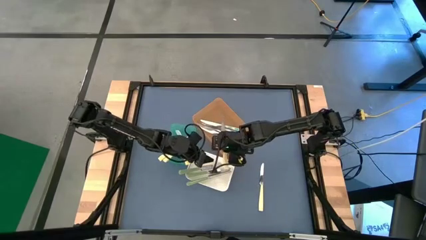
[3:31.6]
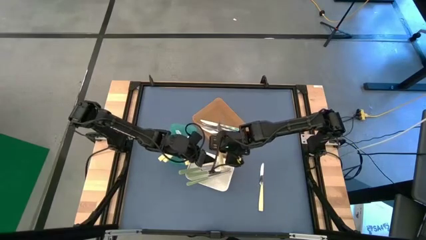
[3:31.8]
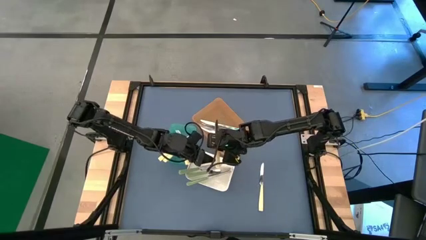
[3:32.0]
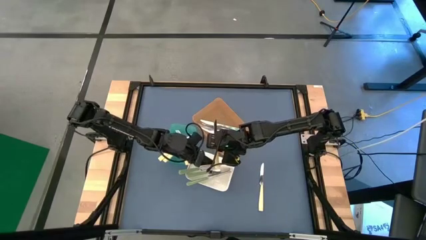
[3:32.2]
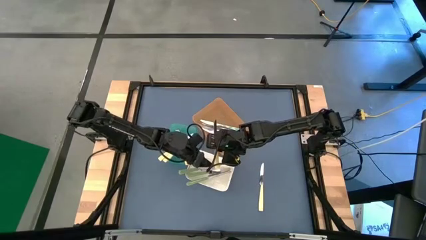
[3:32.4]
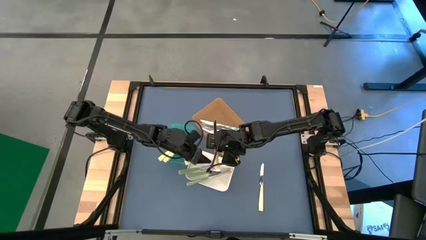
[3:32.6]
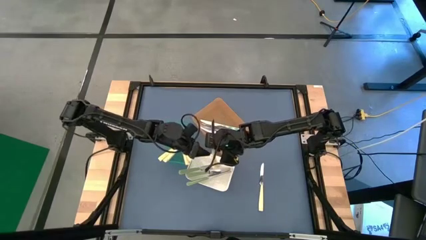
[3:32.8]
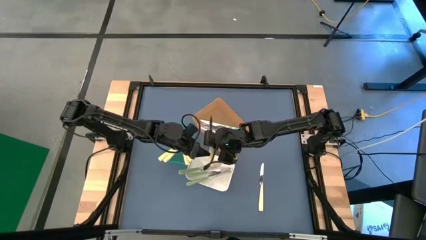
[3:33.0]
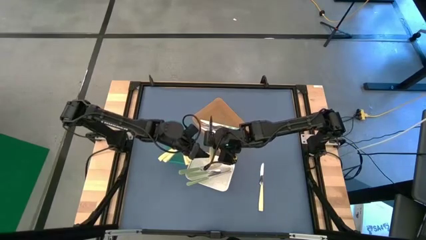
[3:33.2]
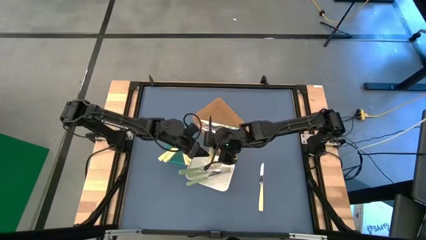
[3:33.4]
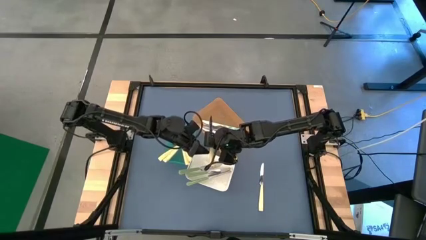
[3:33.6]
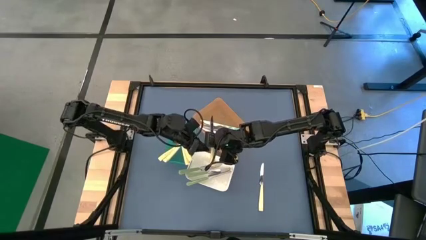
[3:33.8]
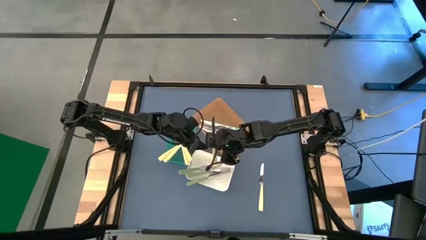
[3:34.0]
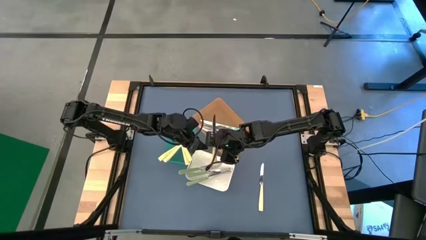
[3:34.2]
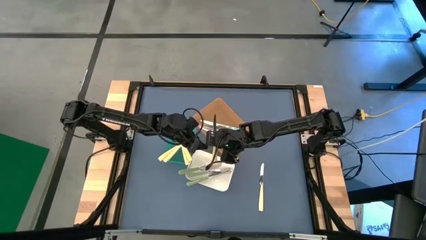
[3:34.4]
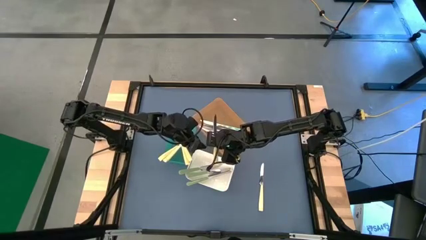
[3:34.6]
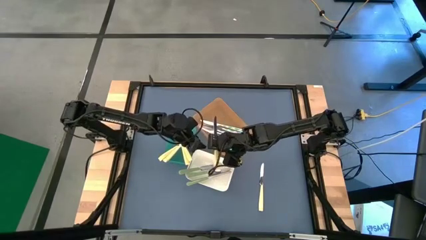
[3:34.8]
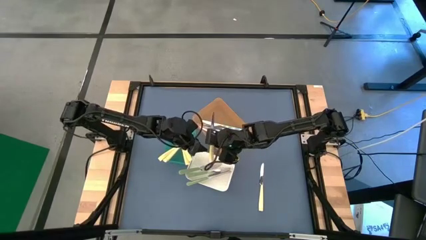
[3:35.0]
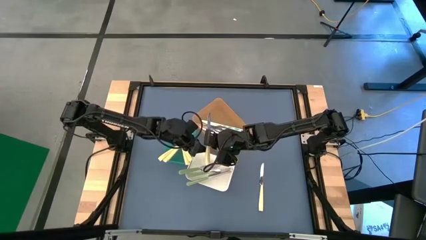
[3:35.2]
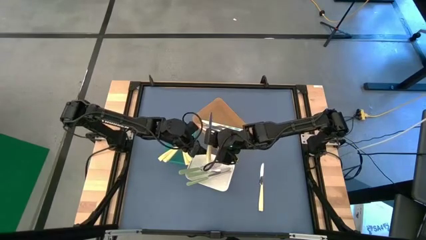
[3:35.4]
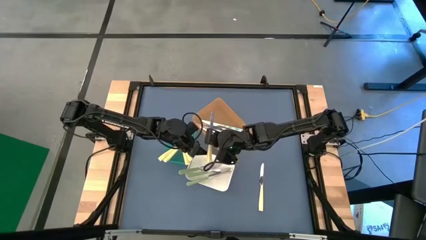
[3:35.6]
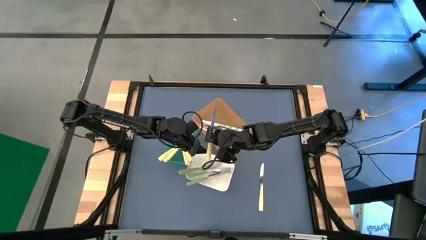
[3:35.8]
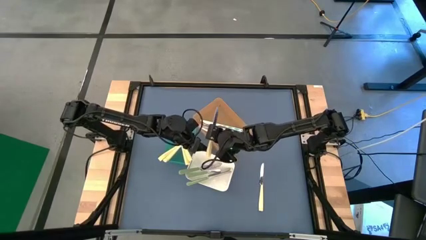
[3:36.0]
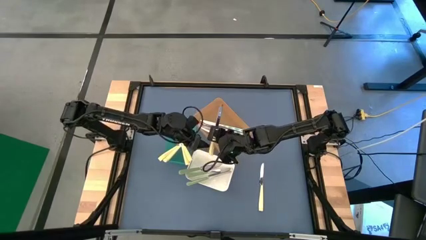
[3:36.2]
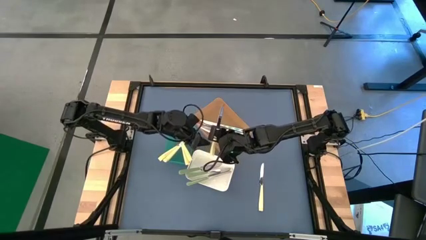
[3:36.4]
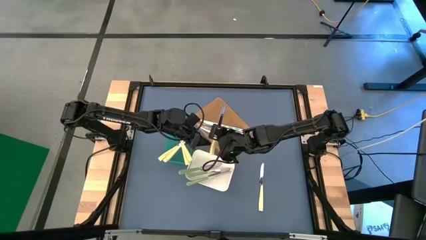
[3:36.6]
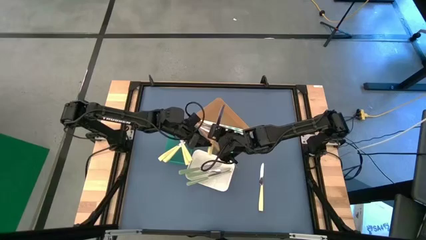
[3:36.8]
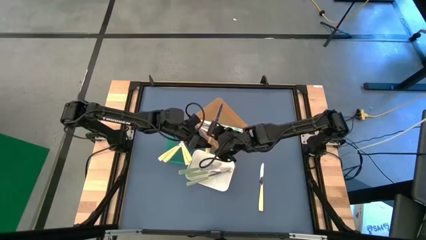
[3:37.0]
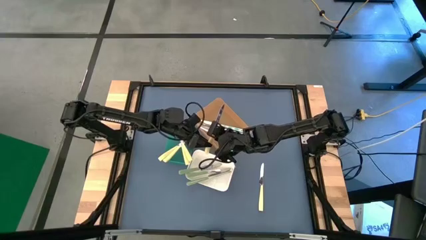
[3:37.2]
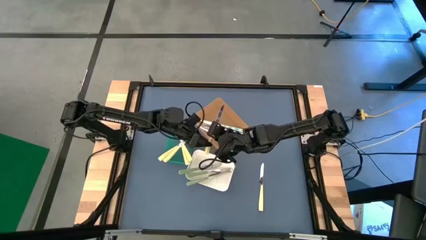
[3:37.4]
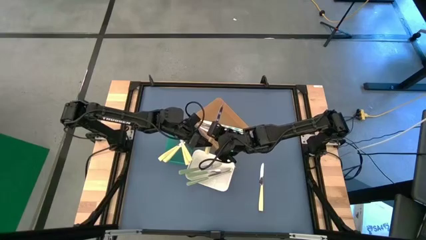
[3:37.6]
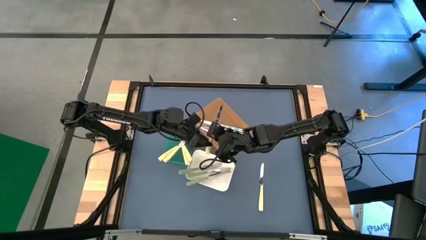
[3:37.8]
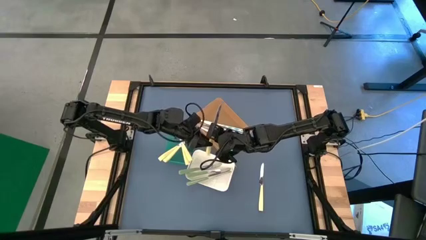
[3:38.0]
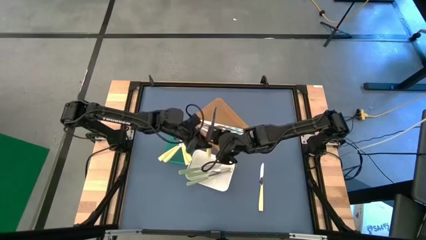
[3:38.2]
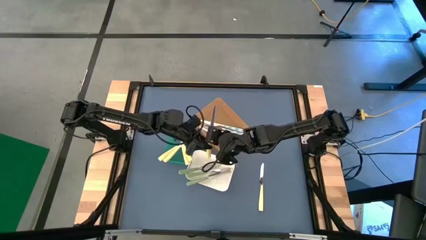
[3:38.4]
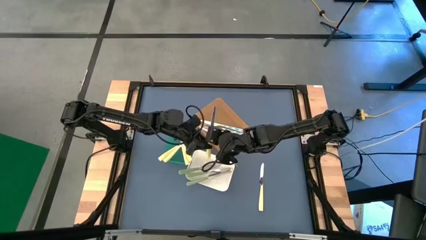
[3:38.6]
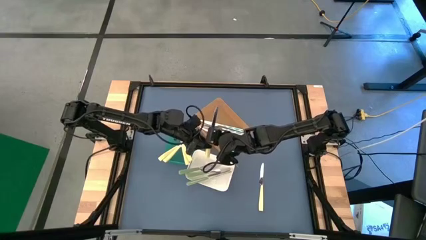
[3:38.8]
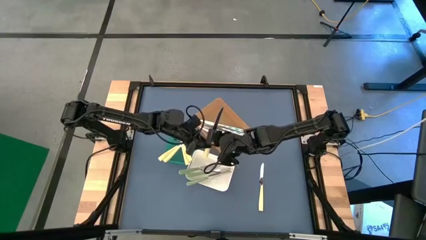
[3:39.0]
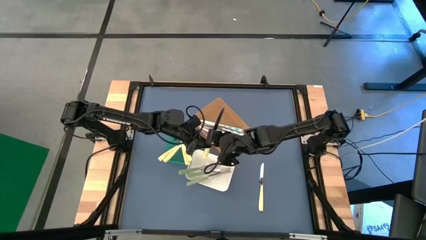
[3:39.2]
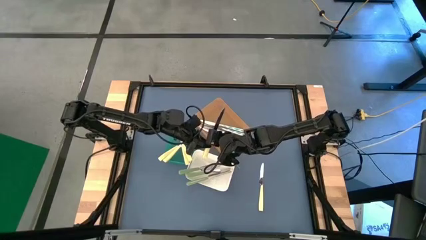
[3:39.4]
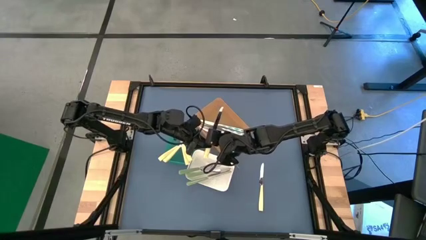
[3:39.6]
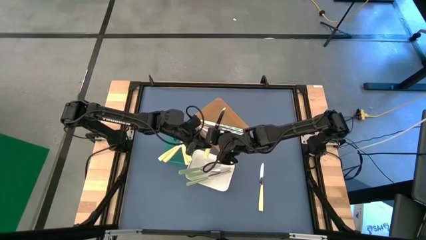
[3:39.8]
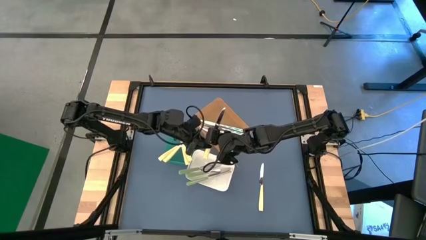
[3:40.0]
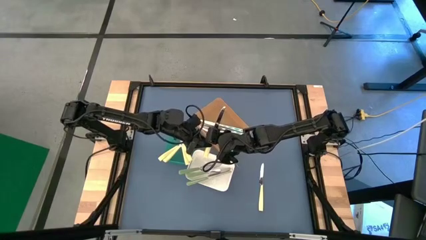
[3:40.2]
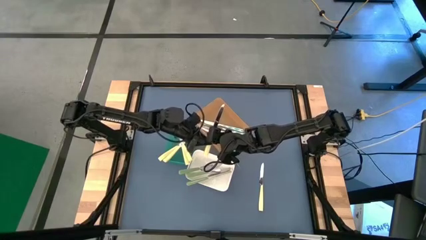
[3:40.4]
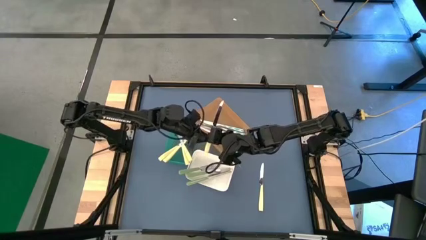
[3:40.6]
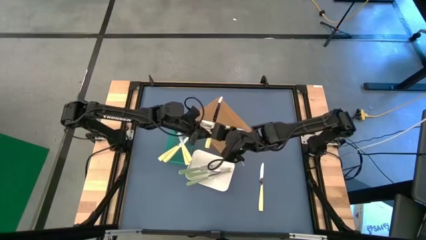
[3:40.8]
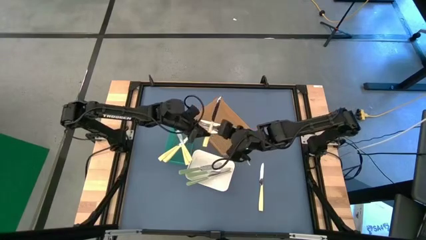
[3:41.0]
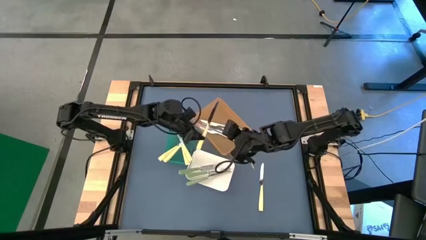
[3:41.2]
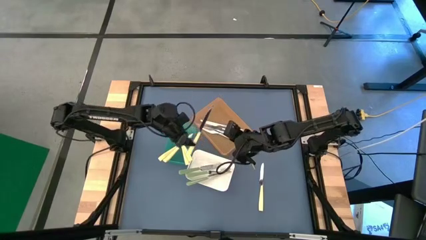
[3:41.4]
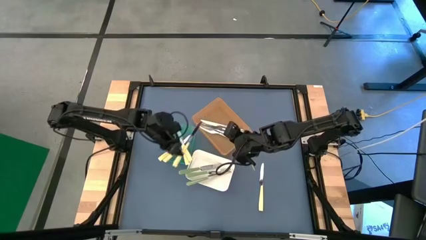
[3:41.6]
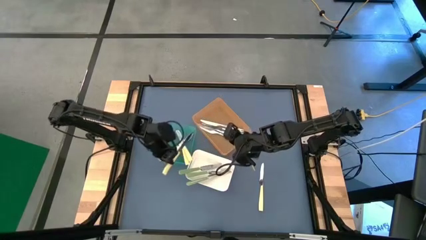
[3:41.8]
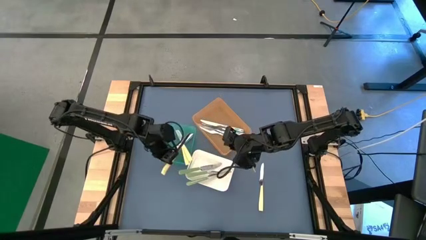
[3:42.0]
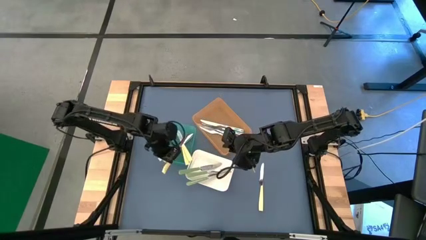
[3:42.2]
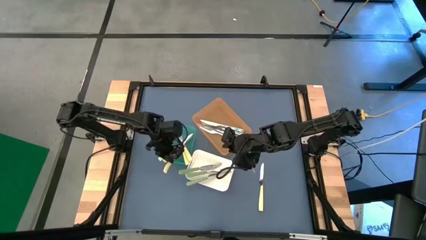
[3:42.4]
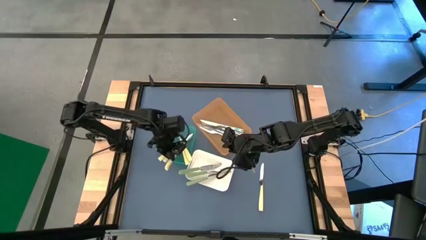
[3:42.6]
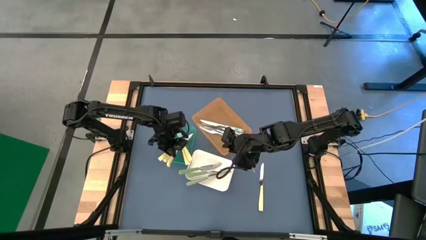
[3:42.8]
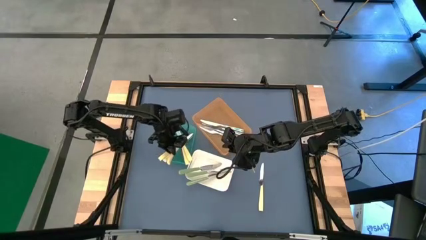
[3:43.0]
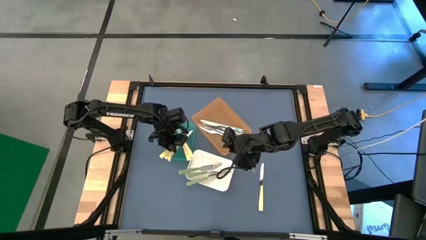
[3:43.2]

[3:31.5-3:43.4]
Task: Sort silverware by color (type)
Put the yellow table knife into the green bin

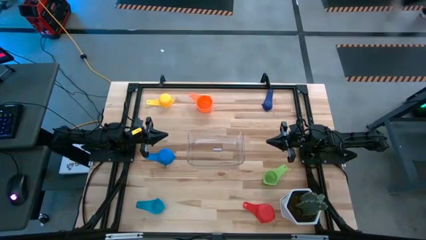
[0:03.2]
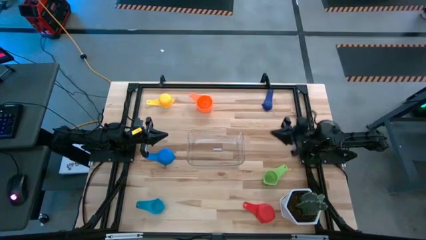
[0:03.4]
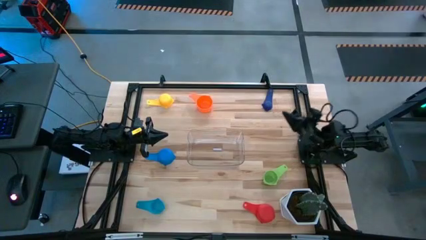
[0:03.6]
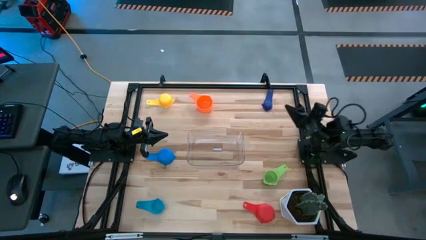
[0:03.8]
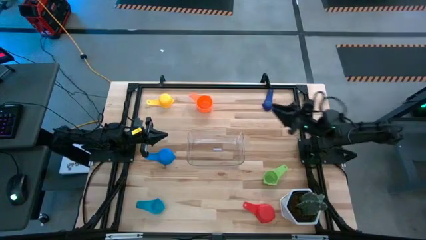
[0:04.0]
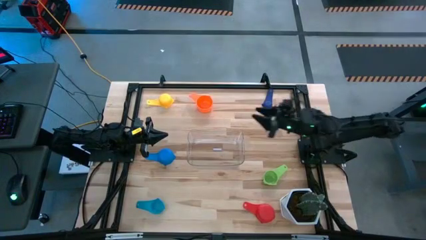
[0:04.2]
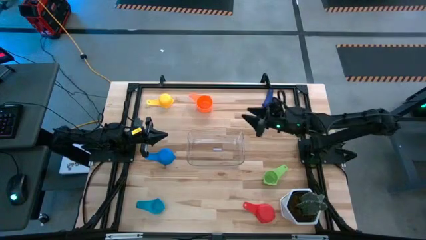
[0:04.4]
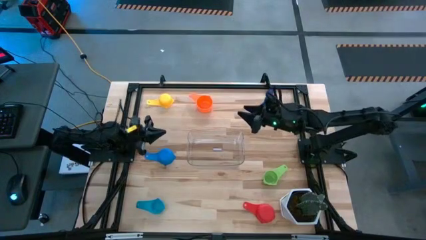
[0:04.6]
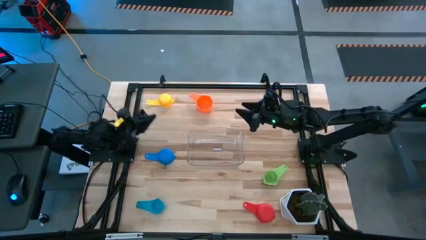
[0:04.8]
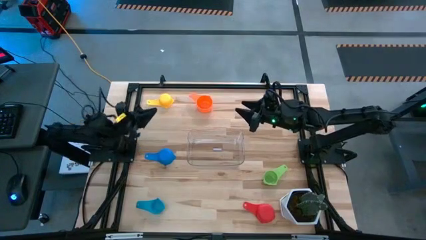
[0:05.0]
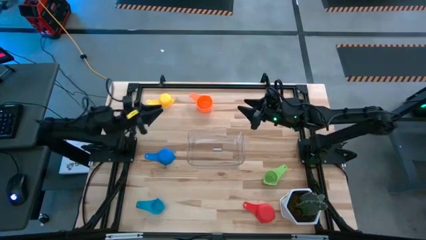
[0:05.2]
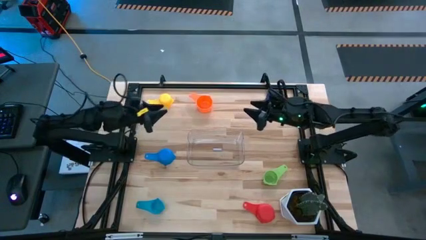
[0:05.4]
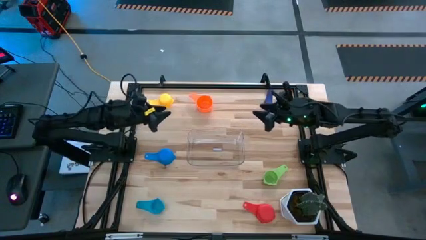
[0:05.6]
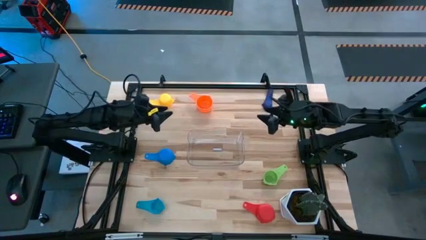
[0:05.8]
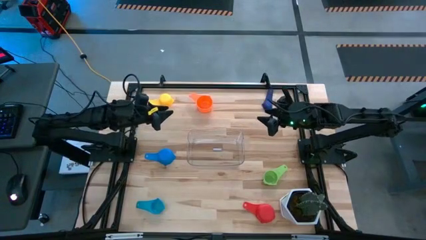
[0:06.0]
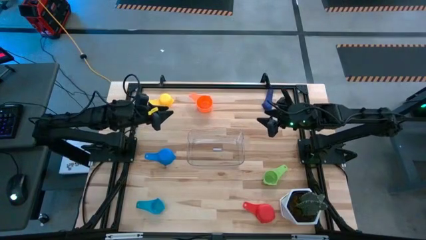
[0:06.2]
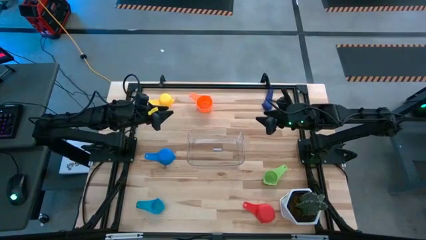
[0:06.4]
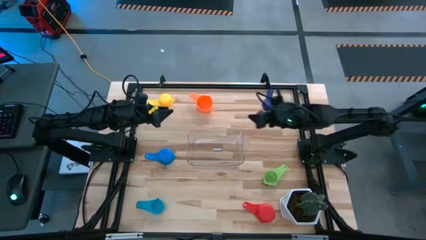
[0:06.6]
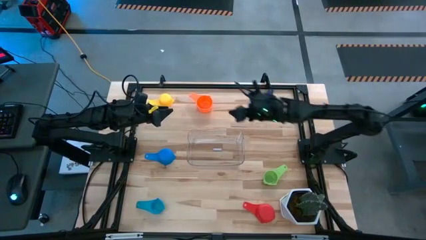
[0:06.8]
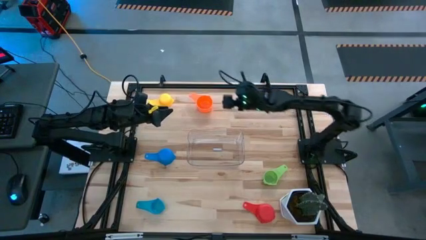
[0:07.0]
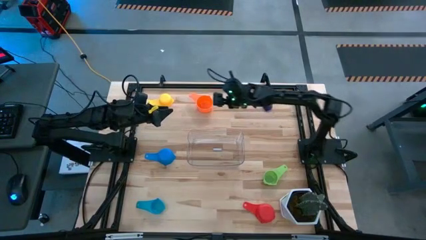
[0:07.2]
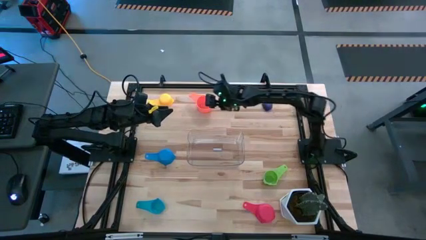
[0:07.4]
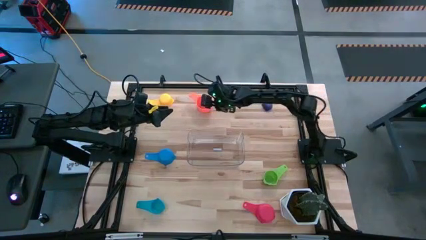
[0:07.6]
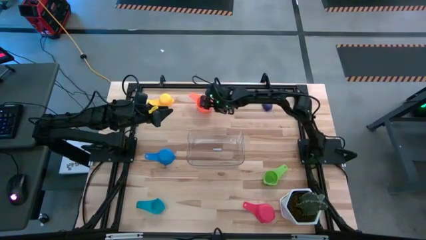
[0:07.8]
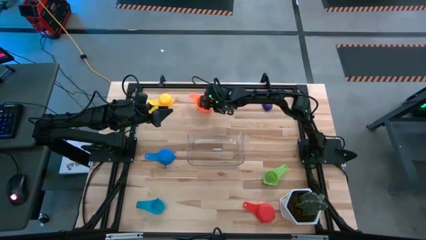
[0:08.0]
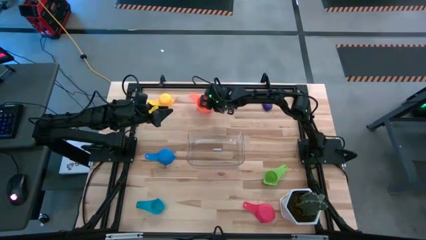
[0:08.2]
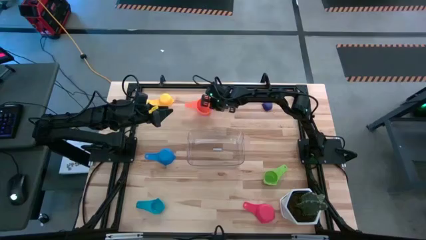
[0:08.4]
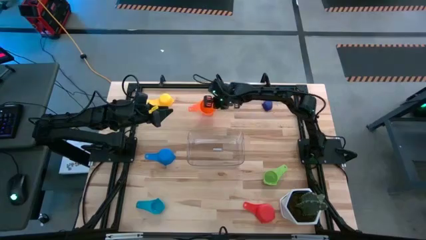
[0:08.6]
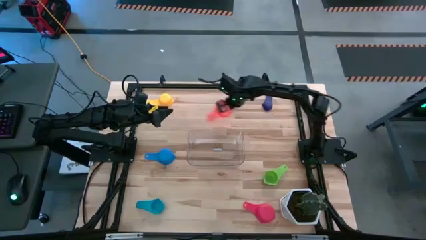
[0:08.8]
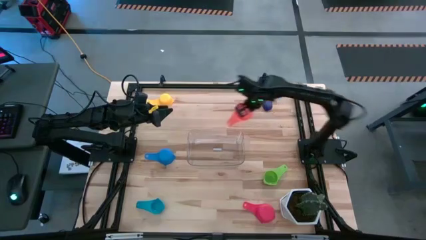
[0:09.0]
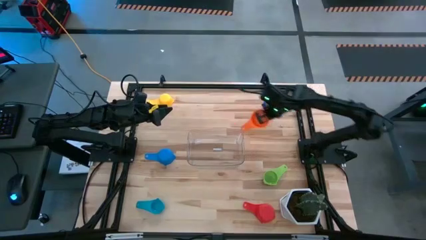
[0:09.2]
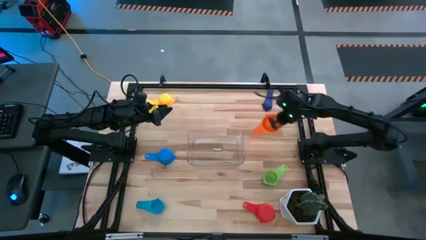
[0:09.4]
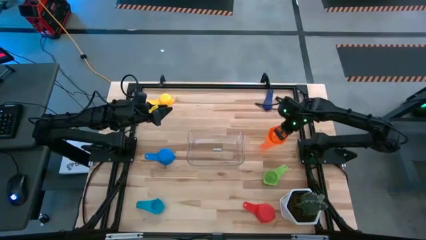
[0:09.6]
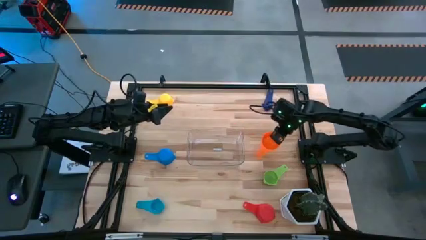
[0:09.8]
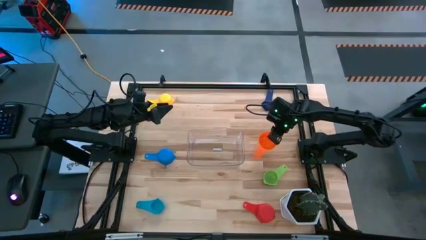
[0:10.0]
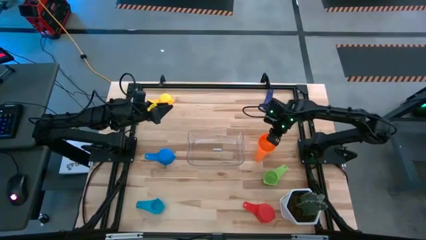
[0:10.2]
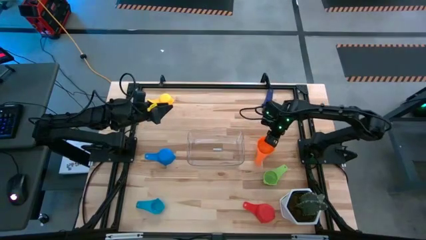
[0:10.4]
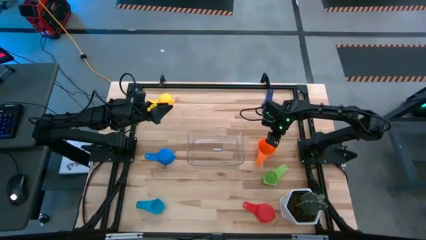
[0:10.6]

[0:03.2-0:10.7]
Task: Nest measuring cups in basket
Prepare the orange measuring cup
